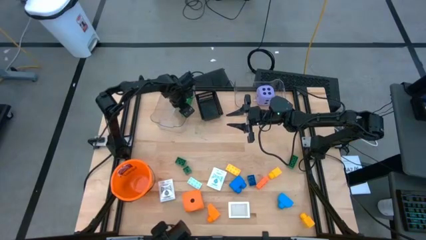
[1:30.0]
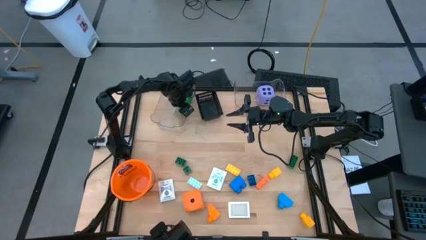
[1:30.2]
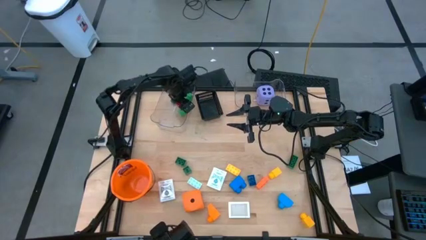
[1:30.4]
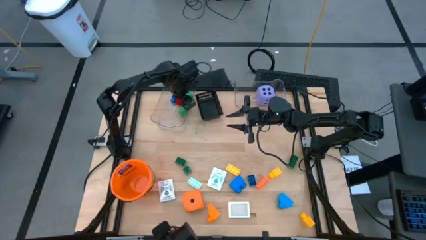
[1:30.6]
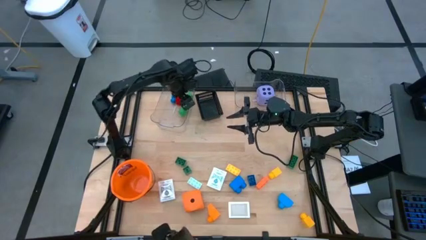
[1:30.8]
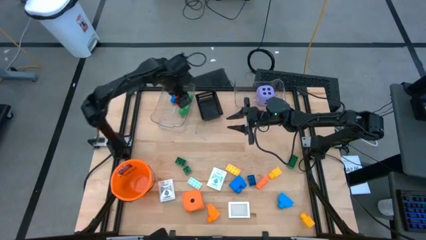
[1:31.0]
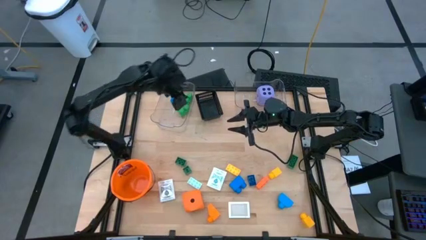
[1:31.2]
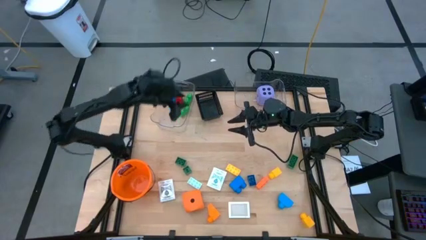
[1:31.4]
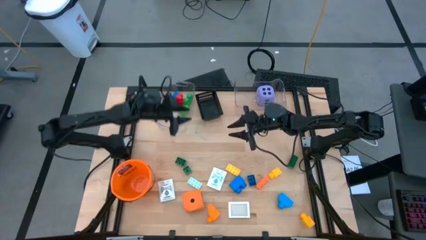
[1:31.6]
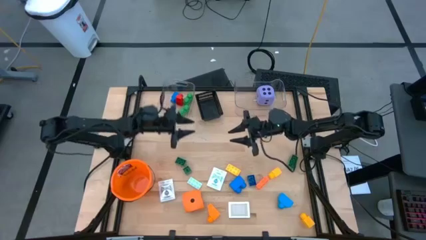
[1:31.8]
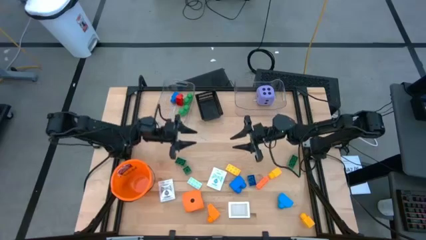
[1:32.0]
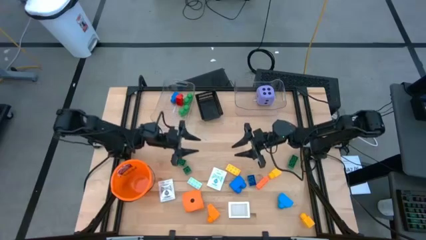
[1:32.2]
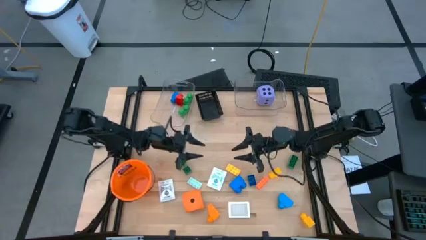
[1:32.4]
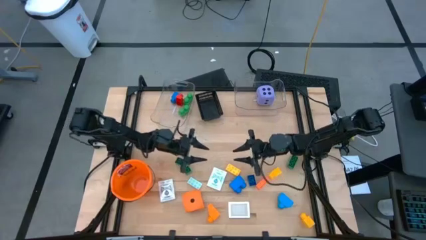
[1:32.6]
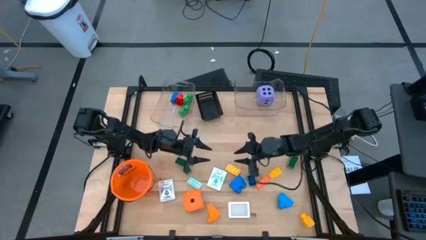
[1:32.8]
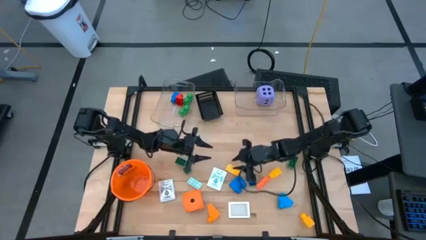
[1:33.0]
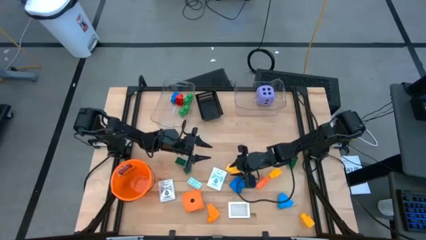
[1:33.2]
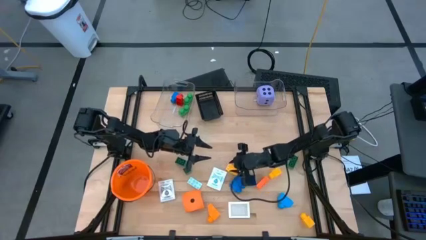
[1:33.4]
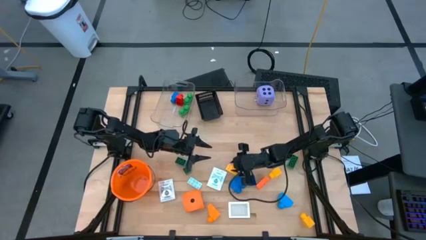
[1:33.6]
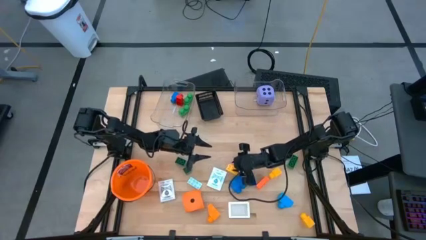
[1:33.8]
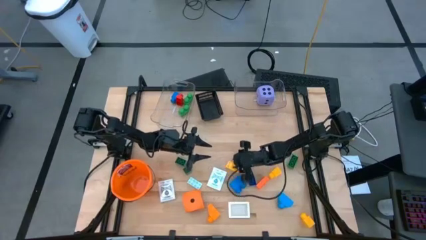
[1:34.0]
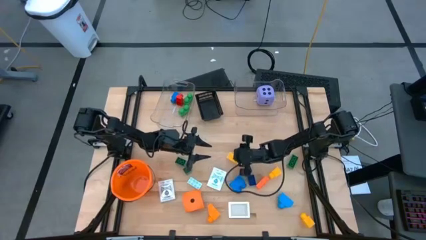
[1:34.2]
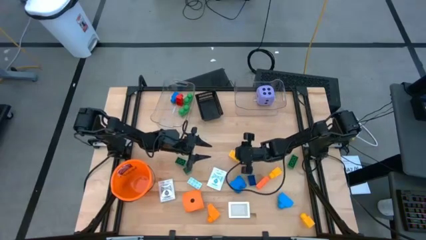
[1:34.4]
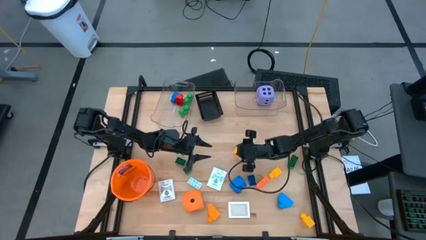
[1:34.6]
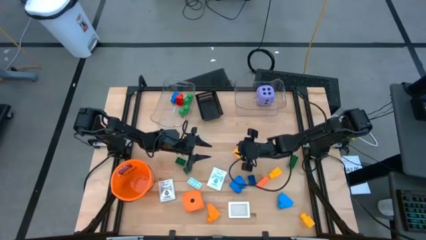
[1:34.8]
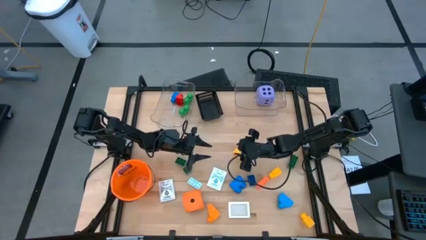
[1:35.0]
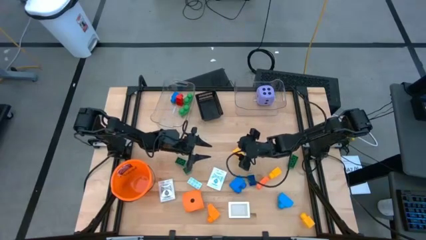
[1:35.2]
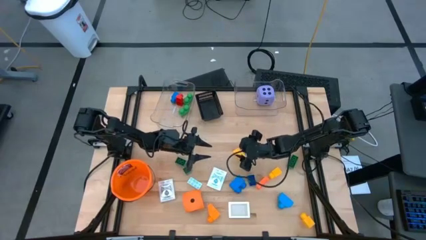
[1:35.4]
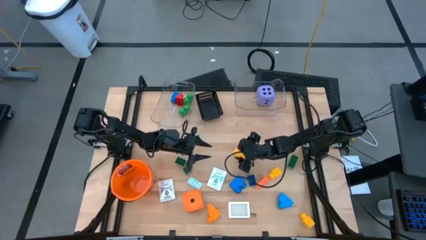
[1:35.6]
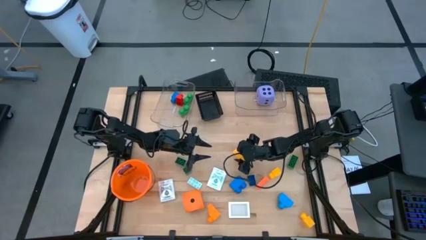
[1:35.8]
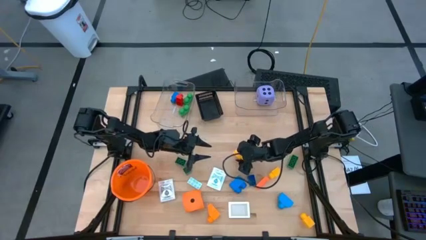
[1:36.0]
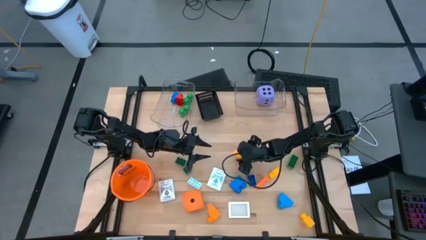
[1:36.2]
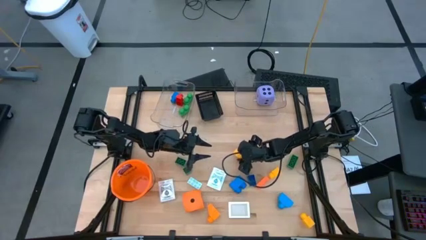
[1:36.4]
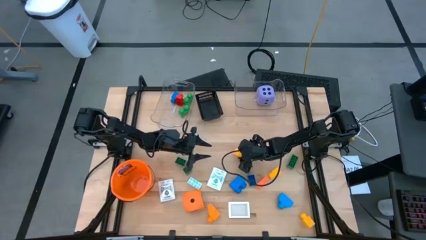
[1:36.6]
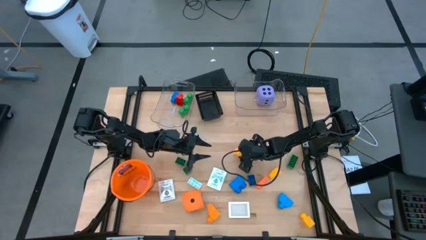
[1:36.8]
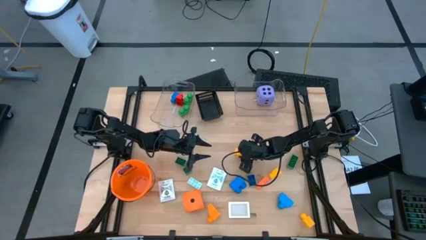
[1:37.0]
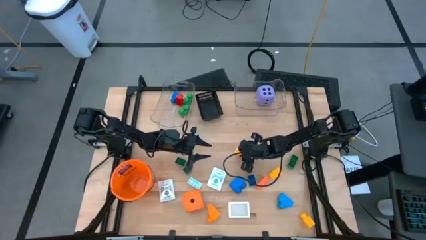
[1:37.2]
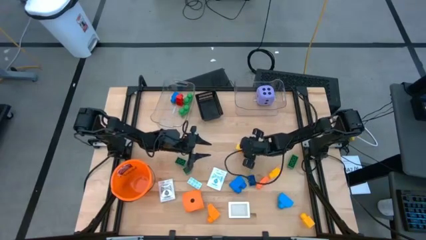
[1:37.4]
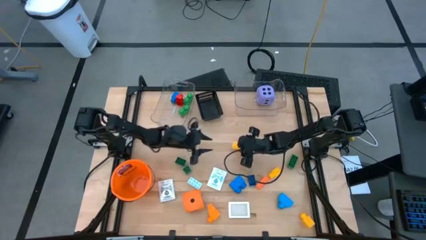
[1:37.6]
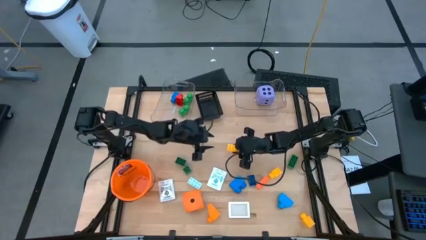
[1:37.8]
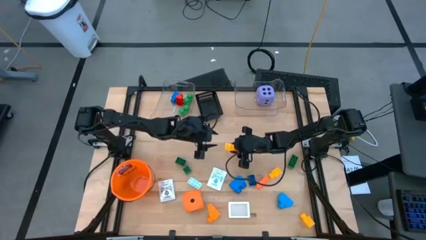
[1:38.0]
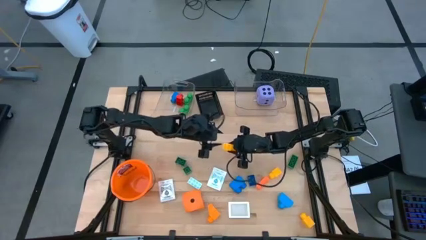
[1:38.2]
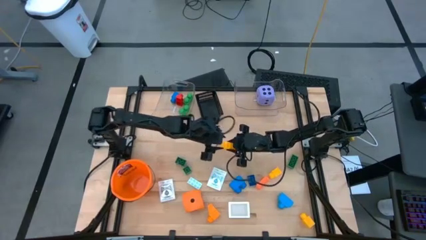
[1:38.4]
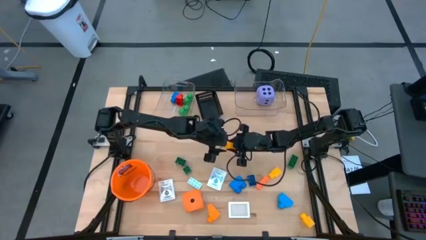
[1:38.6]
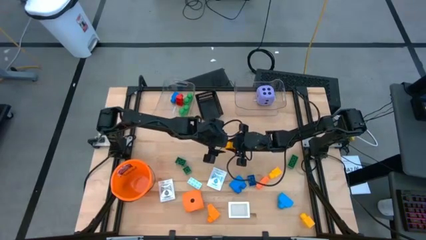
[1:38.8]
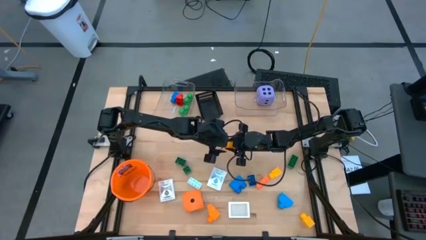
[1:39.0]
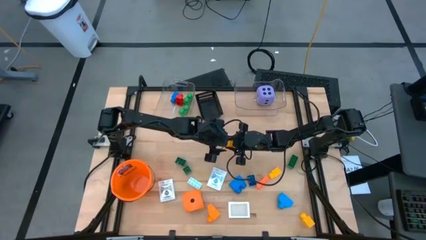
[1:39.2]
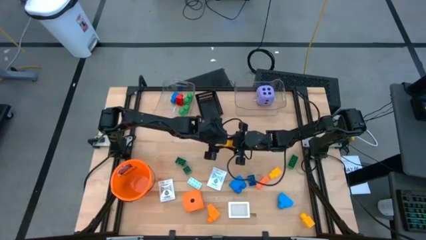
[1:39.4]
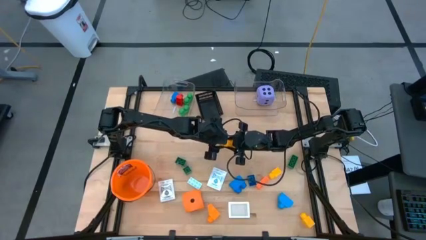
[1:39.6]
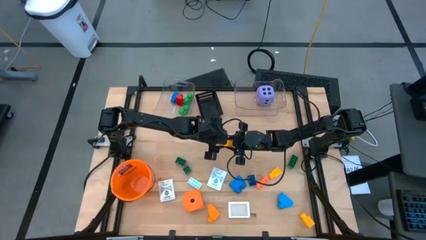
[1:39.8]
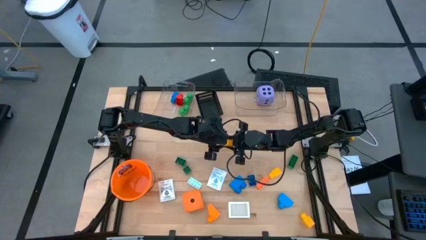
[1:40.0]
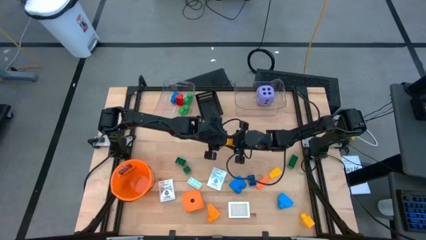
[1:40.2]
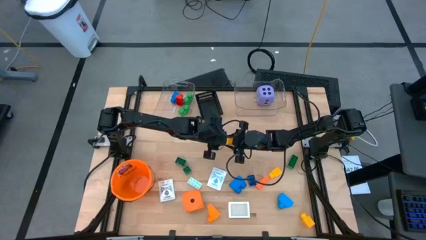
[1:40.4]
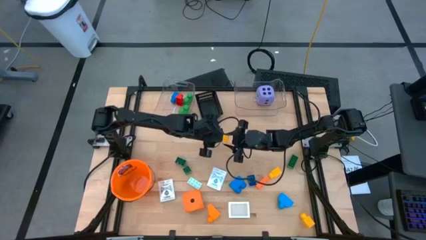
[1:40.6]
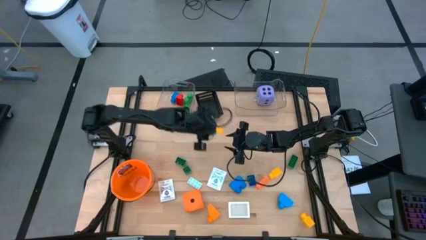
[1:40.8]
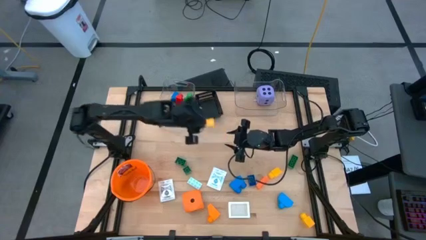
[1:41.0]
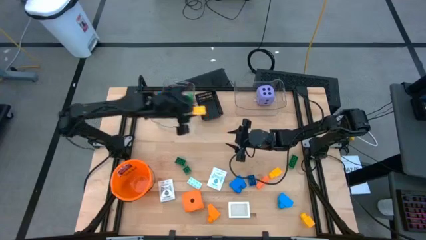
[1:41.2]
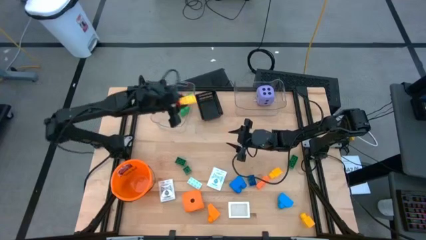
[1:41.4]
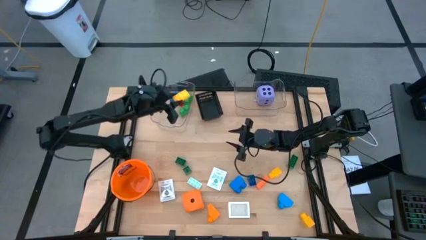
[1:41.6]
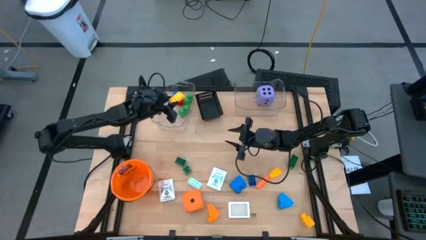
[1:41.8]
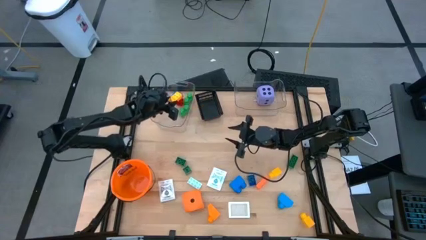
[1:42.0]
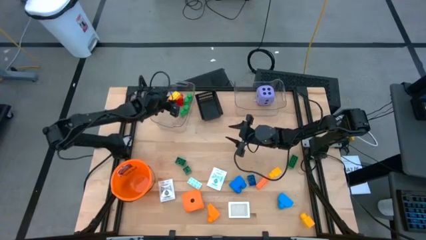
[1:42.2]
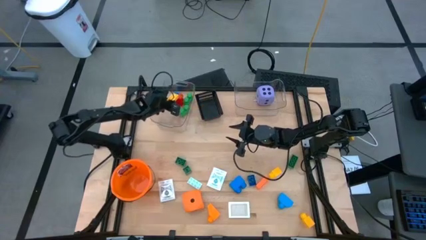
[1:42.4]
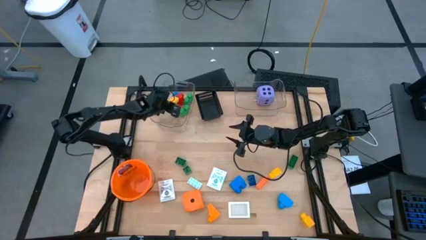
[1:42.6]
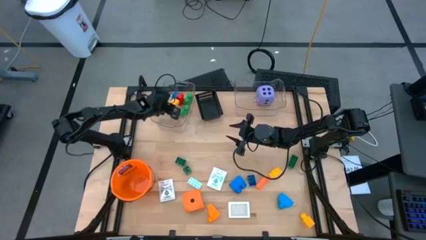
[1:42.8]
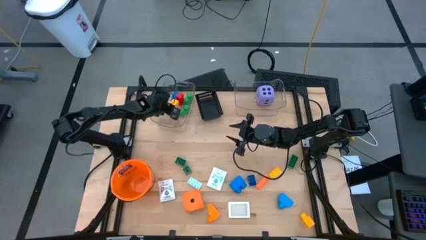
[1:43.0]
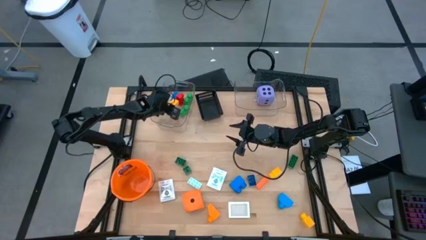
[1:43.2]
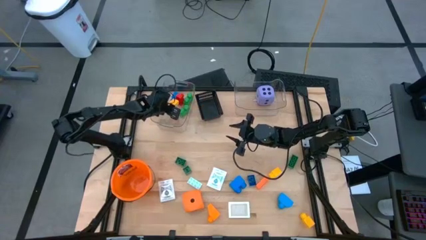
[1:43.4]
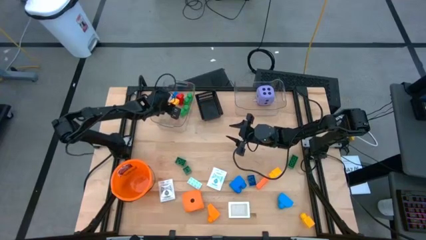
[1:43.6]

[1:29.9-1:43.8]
Task: Pick & Place Toys
Put the yellow gamepiece into the left transparent bin
